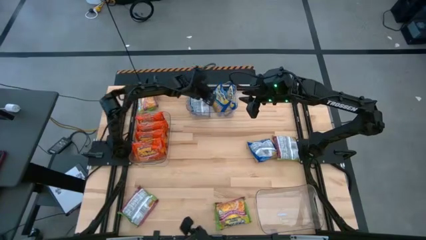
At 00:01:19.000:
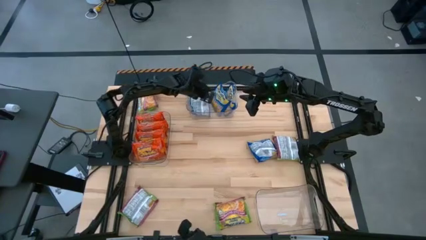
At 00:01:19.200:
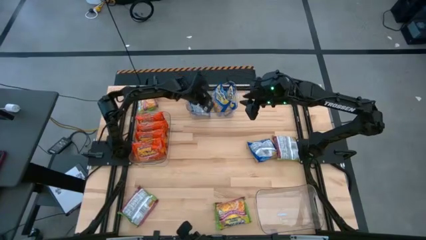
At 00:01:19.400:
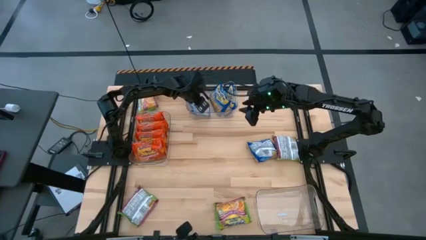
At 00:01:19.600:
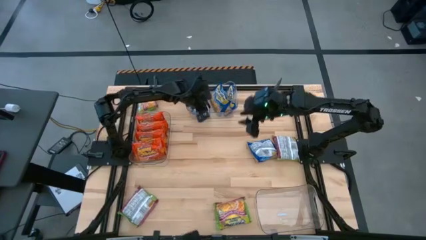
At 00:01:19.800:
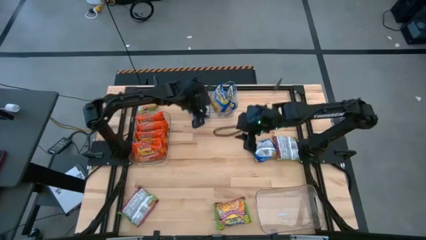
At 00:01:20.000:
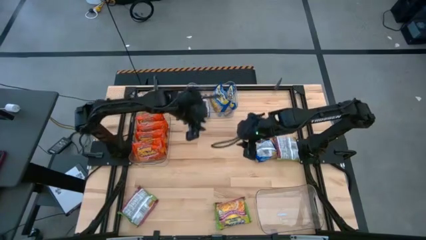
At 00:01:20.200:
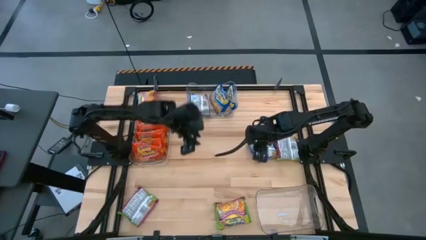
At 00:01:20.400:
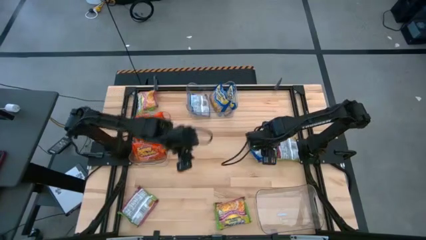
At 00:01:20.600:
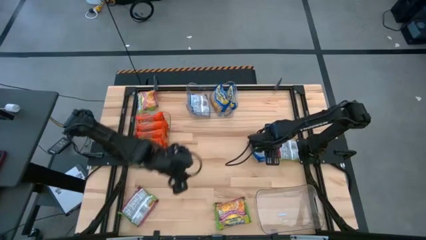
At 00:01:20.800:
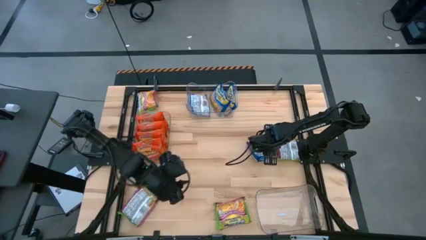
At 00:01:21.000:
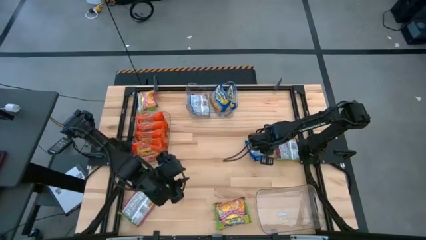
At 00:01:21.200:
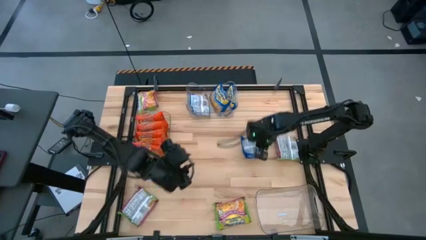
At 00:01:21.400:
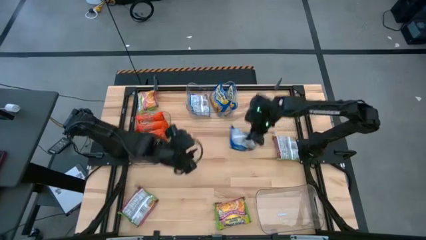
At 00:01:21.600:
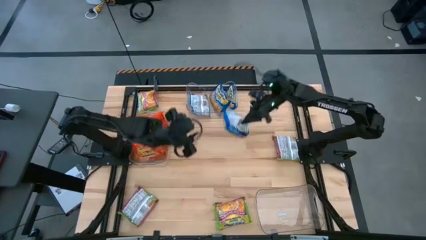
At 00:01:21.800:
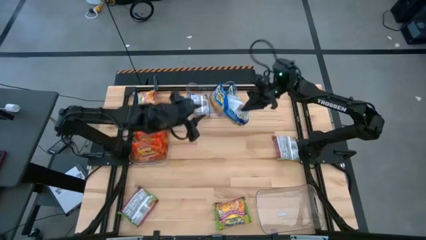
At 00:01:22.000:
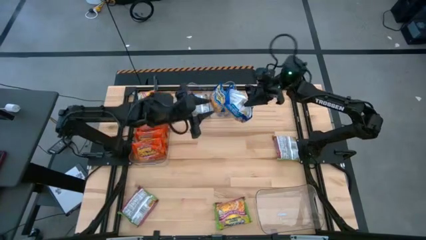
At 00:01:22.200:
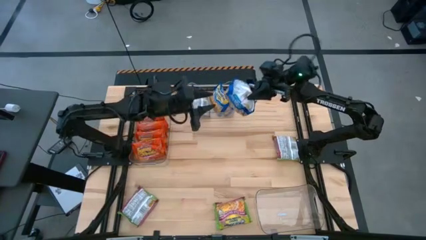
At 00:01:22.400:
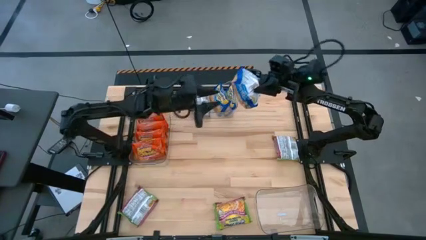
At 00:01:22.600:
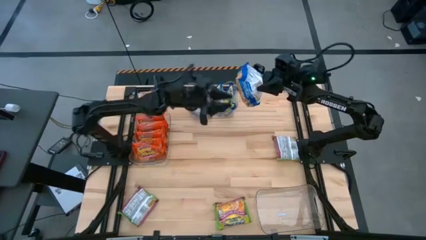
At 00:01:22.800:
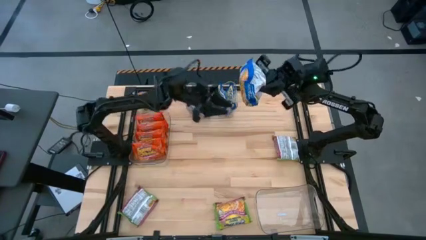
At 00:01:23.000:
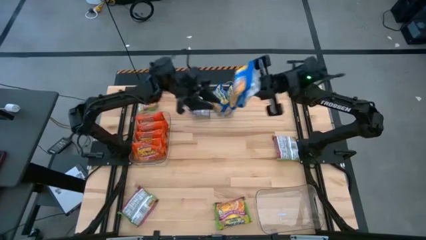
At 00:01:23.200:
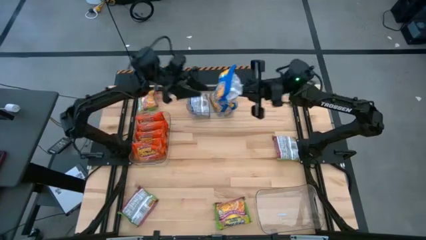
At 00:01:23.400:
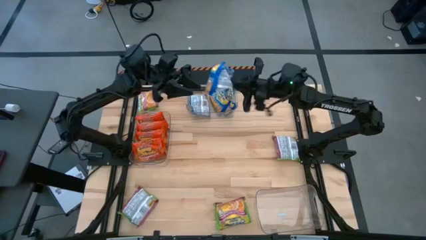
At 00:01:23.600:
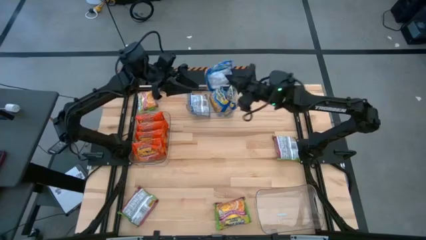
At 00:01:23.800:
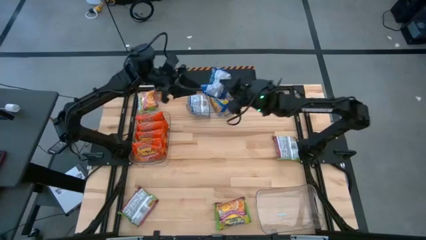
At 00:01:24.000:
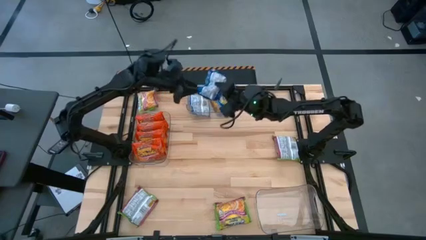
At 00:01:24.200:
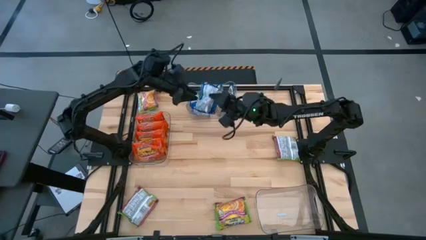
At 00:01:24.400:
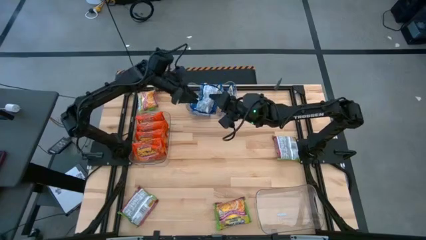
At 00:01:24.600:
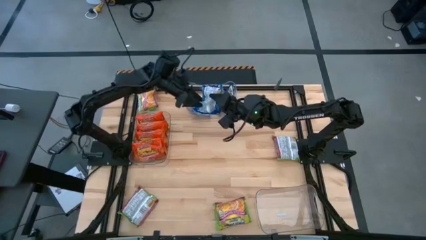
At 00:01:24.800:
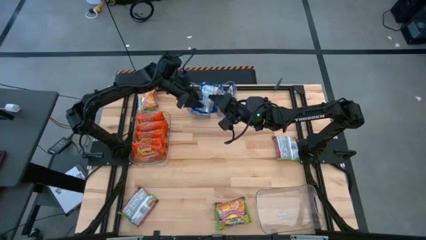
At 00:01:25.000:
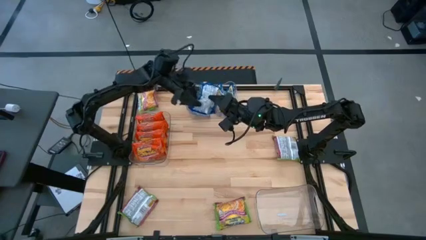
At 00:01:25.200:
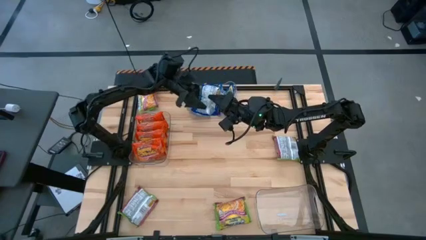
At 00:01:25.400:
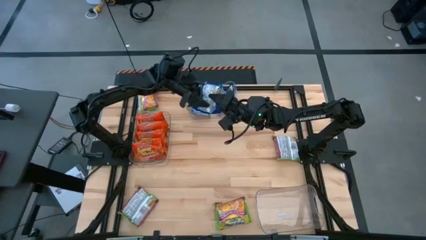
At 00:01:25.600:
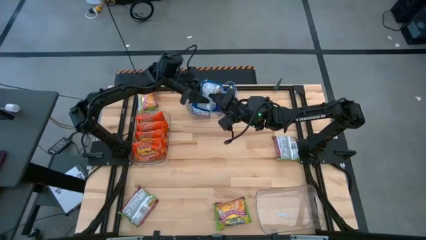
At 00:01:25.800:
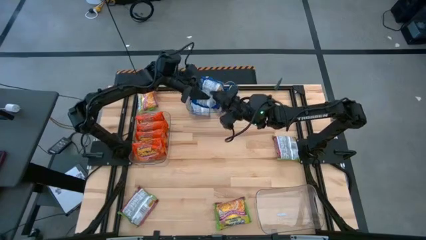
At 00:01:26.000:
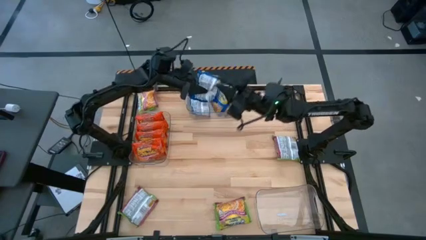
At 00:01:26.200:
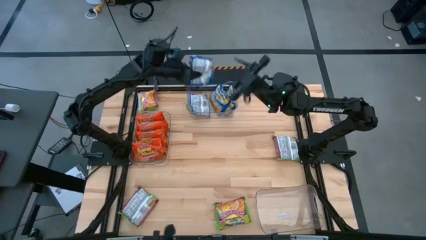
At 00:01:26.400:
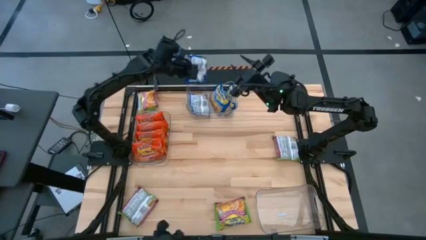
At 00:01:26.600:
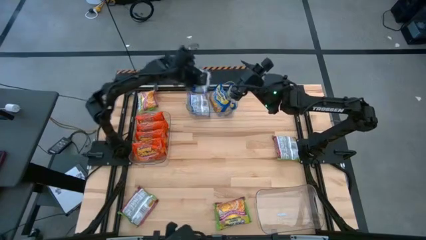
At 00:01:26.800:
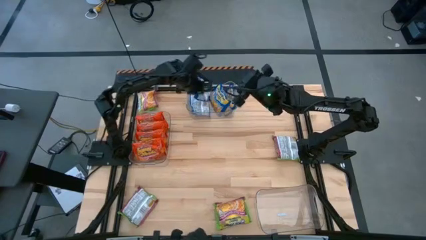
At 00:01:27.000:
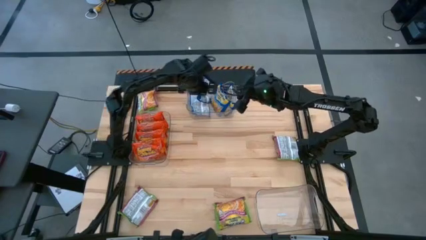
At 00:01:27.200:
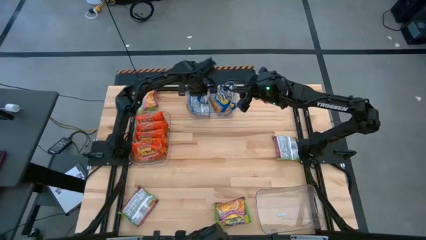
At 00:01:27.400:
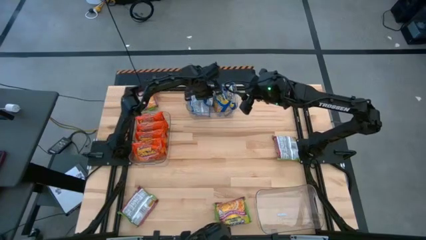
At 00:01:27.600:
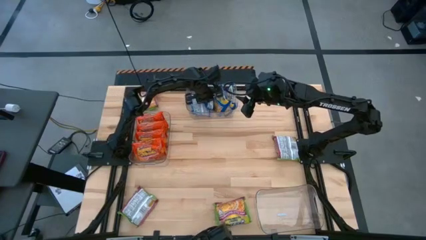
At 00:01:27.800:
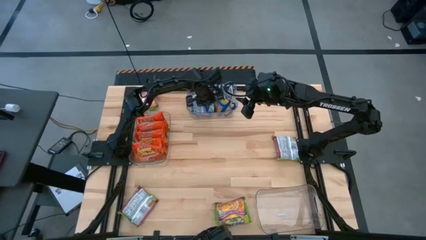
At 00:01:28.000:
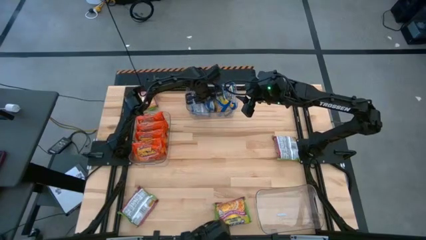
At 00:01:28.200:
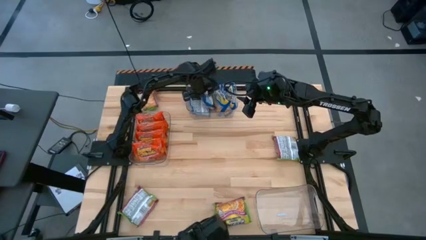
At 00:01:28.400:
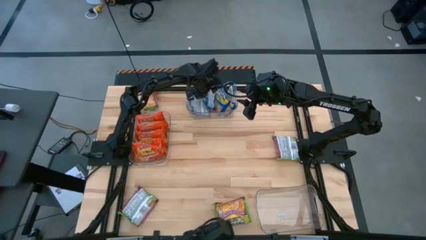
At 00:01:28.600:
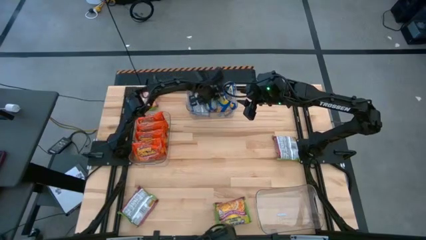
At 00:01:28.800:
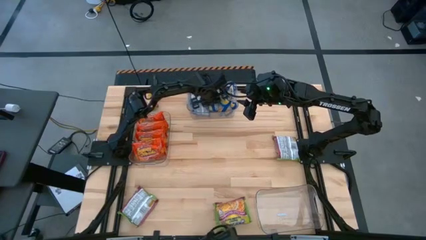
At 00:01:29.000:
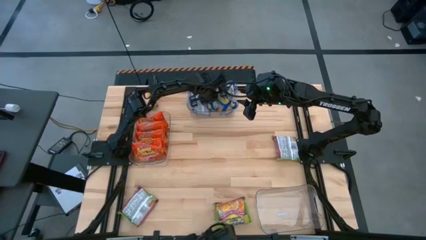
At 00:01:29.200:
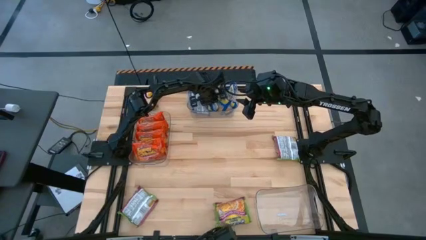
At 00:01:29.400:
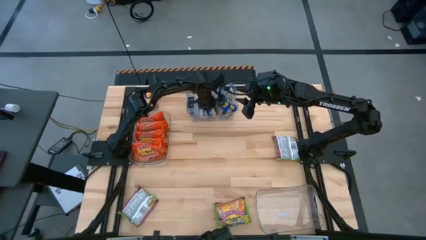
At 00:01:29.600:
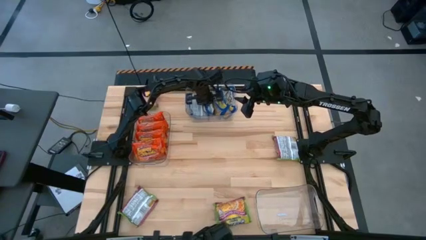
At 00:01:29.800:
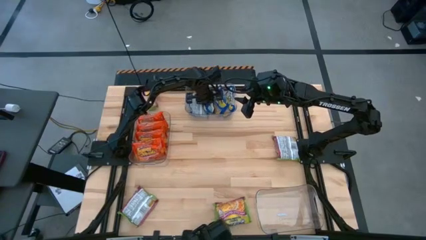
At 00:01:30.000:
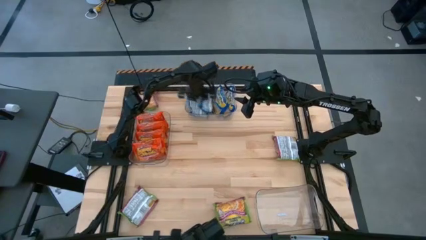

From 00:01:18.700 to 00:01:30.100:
Task: Sort Maruchan noodles
Put the blue noodles into the middle transparent bin

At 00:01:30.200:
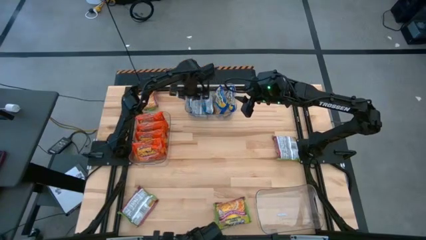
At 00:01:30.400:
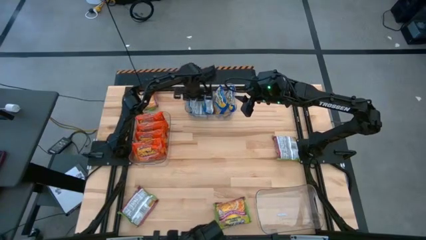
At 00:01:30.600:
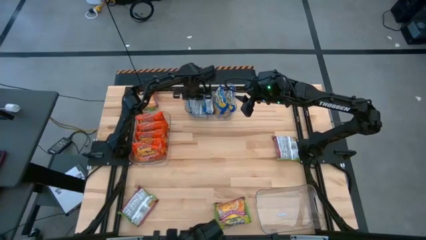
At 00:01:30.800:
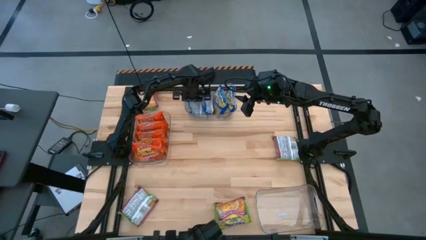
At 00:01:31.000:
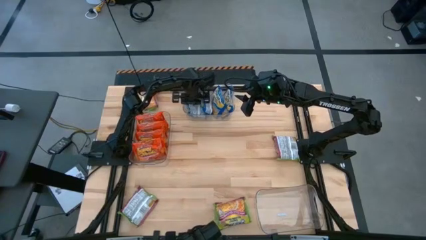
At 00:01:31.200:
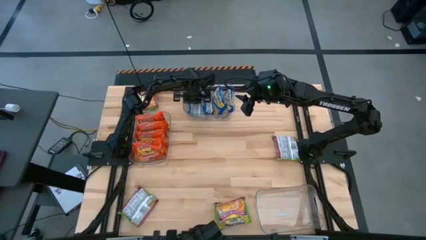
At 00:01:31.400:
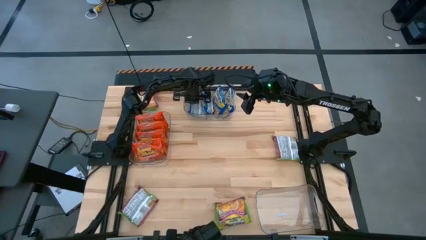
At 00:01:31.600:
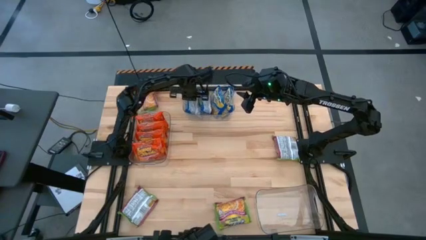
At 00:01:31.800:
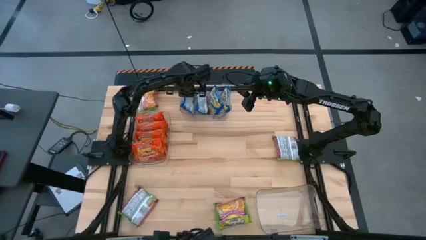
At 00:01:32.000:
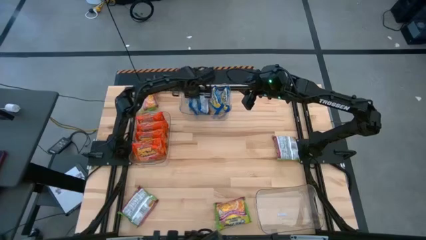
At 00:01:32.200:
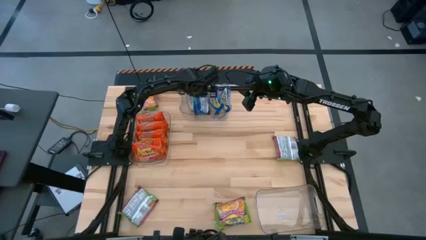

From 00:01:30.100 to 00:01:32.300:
Adjust the blue noodle pack in the middle transparent bin

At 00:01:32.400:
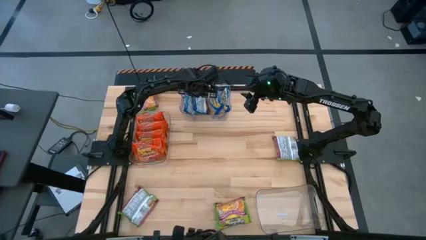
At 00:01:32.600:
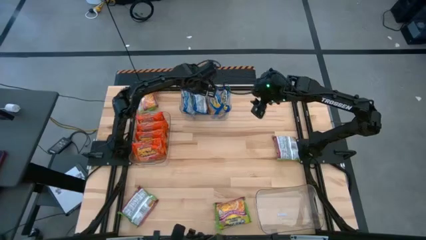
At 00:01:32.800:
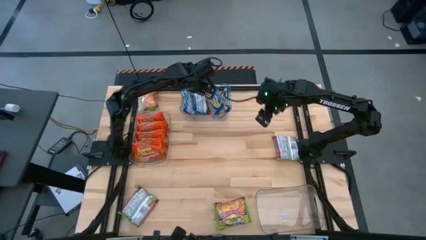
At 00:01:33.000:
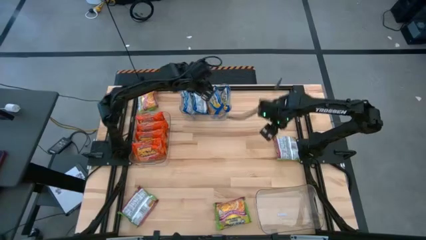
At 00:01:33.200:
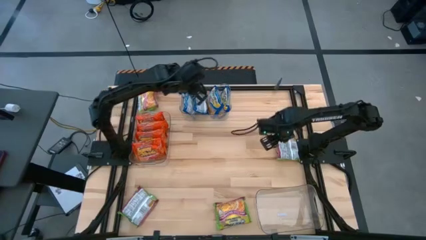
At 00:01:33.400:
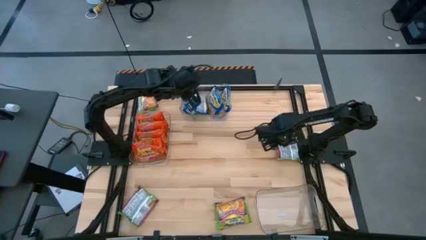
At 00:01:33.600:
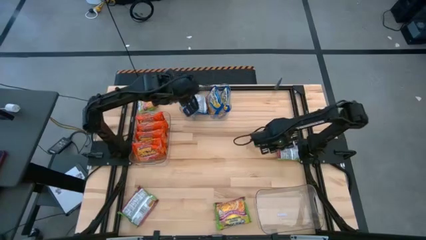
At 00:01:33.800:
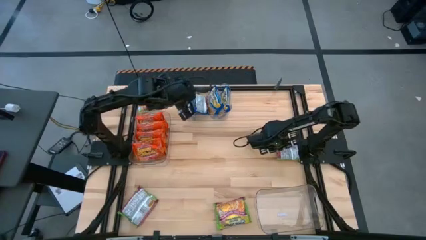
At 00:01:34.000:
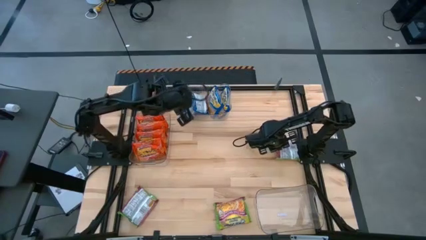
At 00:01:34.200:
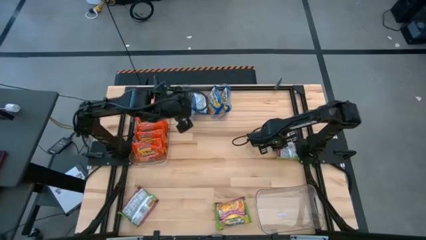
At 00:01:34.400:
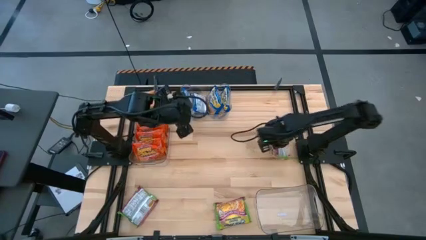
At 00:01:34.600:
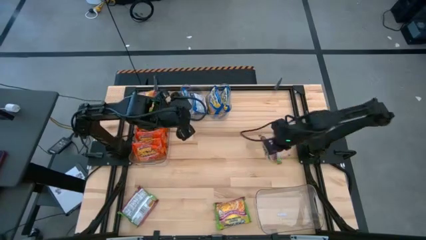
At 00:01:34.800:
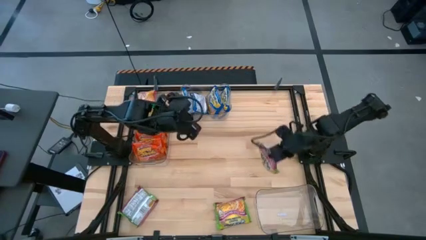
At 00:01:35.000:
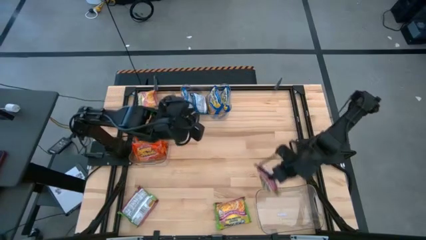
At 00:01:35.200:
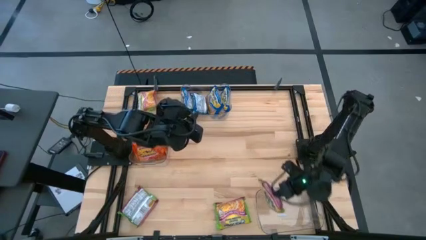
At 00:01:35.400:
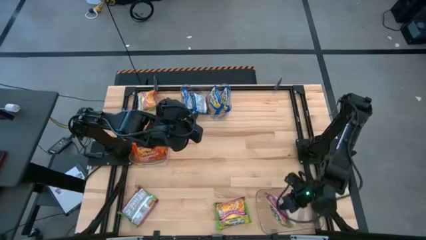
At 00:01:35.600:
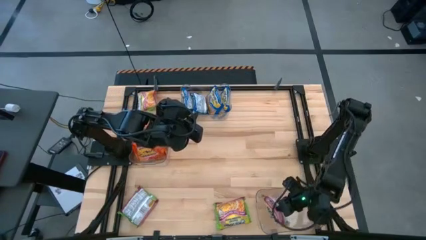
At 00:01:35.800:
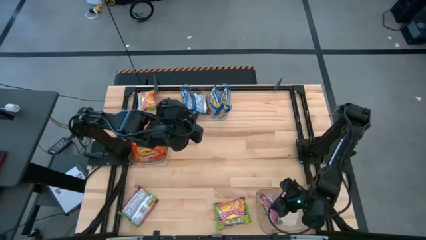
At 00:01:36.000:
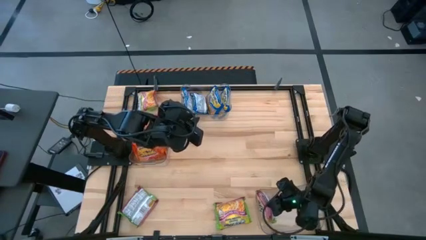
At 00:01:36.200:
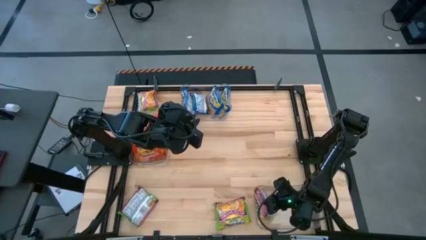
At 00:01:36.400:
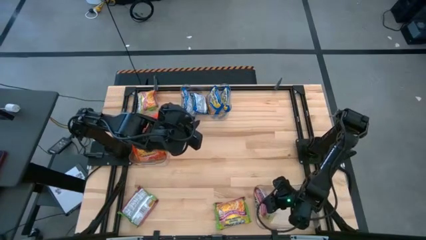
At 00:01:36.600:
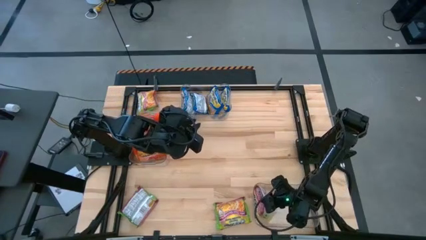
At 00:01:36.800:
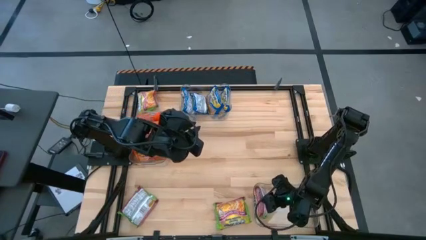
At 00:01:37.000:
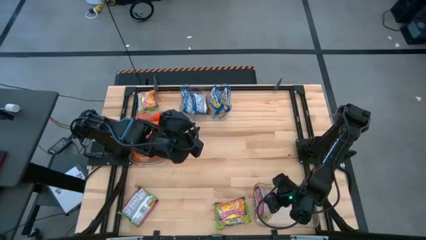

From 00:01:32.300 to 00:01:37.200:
Put the green noodles into the right transparent bin
